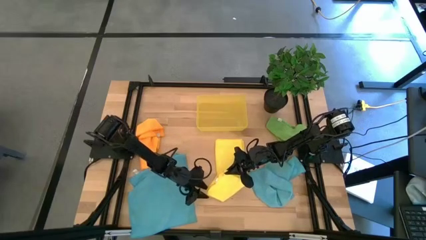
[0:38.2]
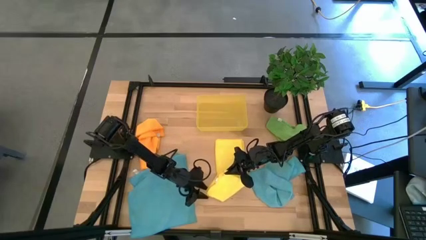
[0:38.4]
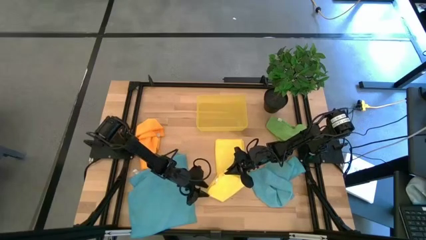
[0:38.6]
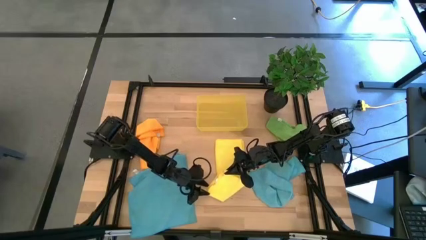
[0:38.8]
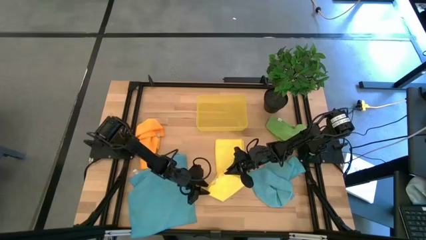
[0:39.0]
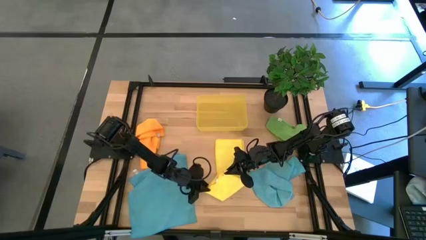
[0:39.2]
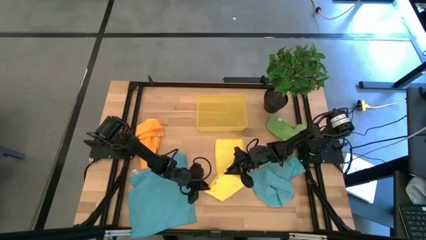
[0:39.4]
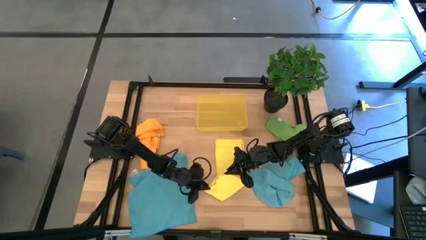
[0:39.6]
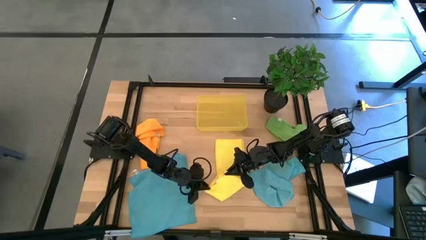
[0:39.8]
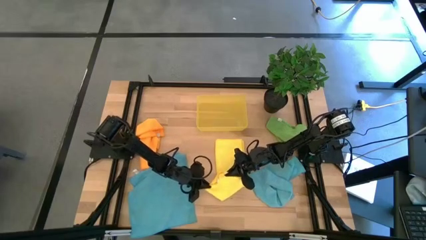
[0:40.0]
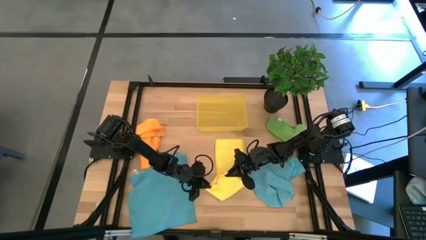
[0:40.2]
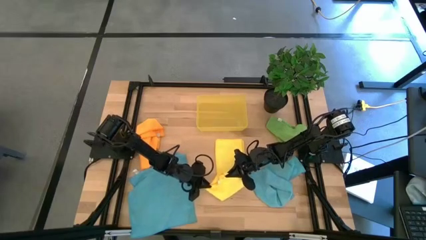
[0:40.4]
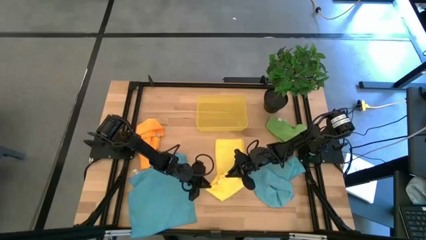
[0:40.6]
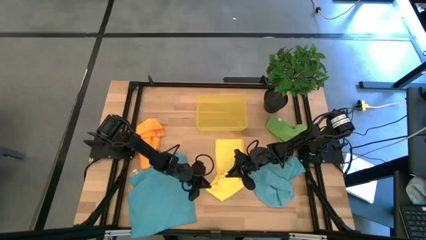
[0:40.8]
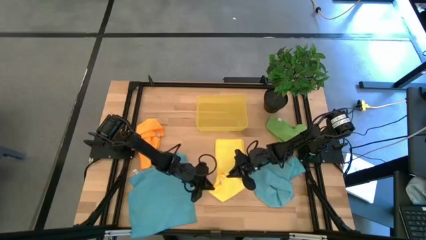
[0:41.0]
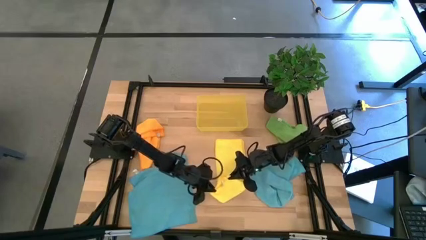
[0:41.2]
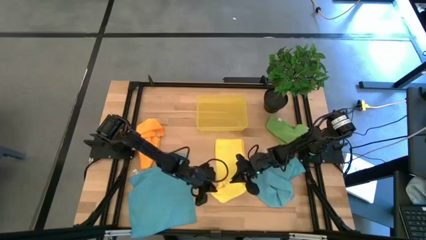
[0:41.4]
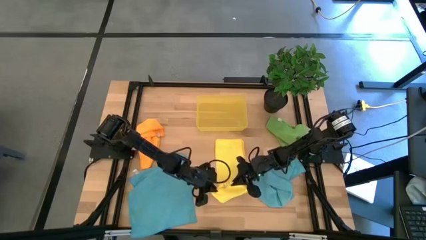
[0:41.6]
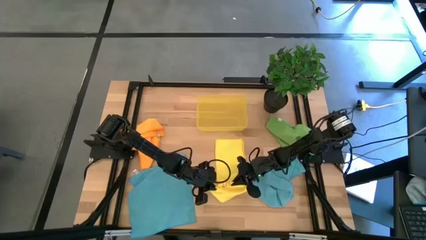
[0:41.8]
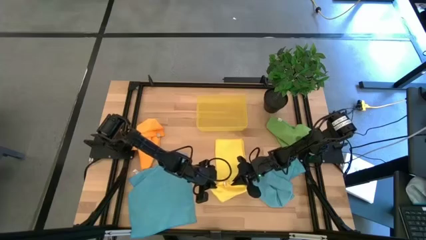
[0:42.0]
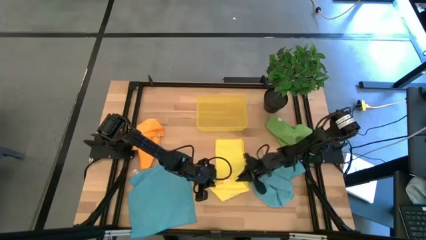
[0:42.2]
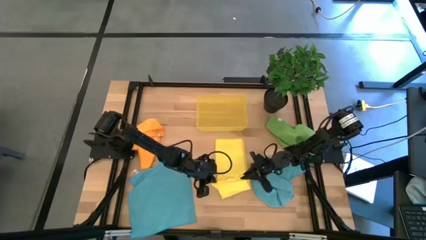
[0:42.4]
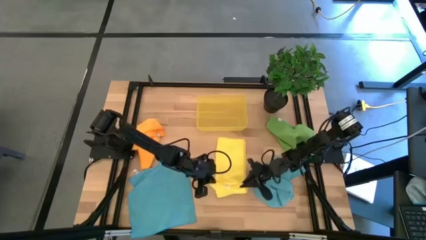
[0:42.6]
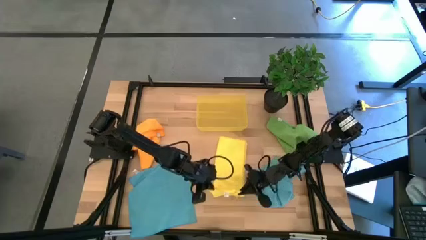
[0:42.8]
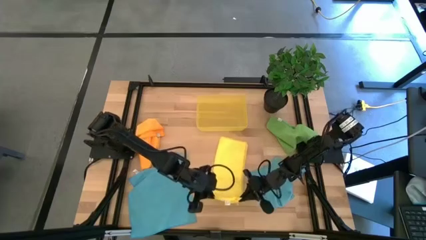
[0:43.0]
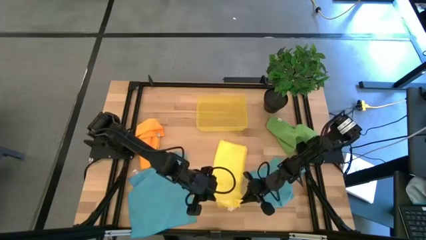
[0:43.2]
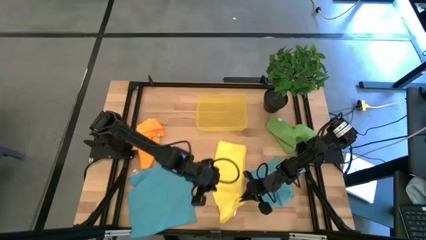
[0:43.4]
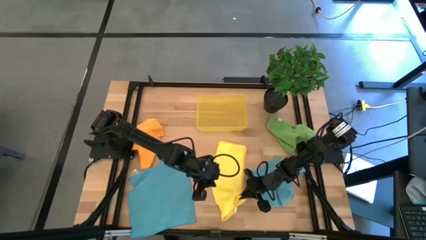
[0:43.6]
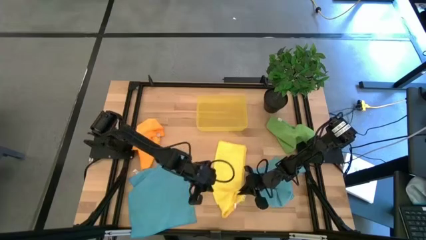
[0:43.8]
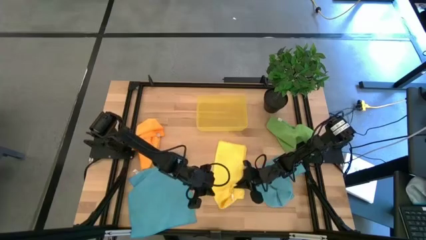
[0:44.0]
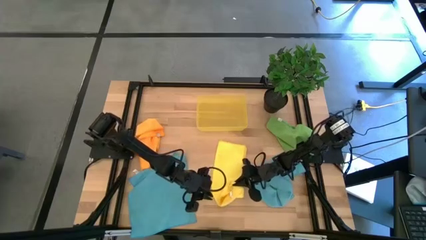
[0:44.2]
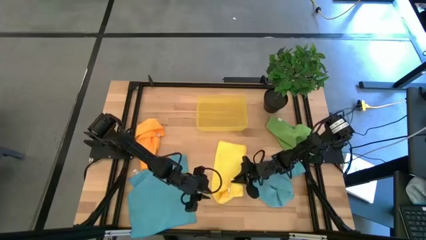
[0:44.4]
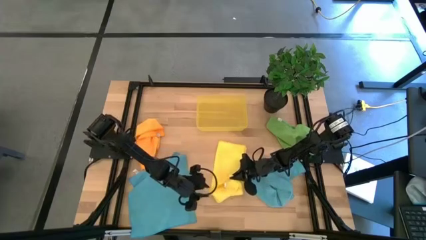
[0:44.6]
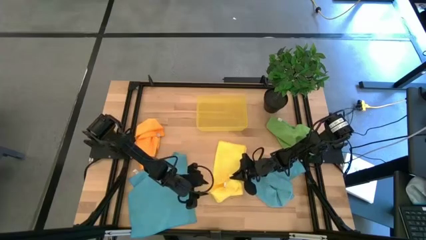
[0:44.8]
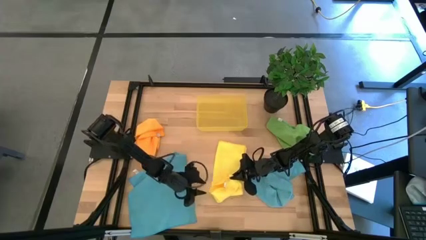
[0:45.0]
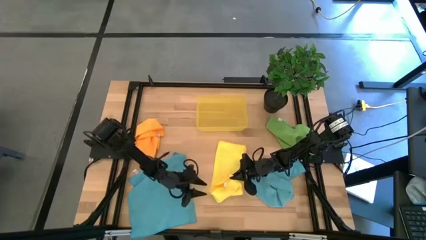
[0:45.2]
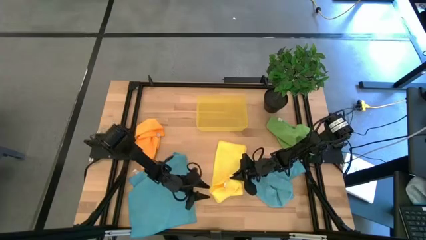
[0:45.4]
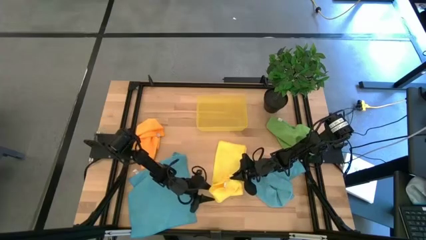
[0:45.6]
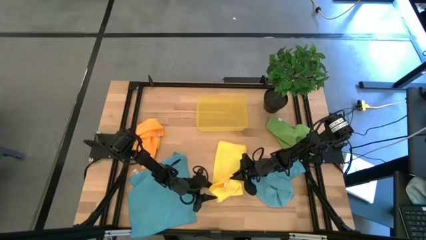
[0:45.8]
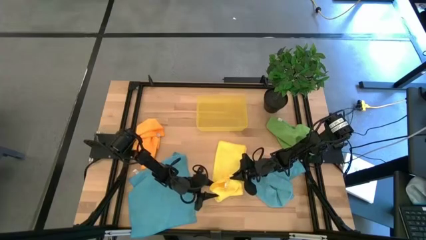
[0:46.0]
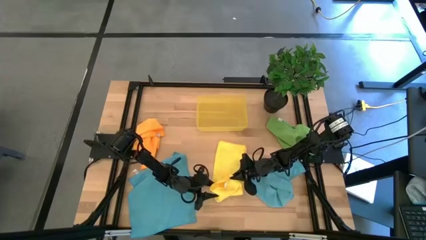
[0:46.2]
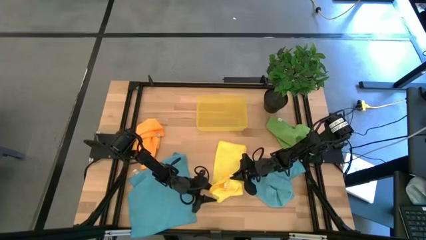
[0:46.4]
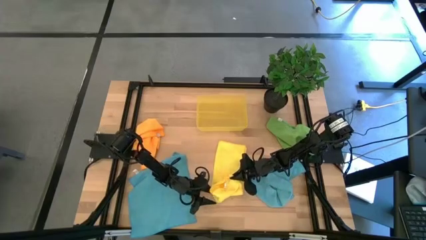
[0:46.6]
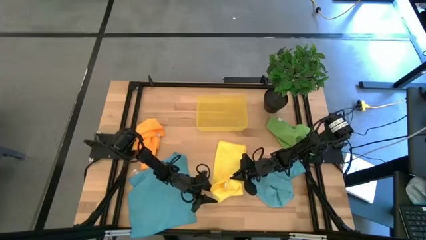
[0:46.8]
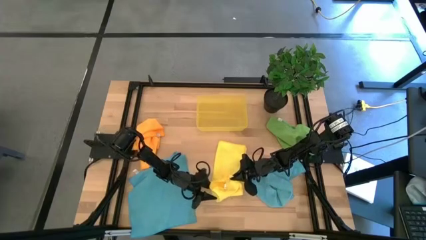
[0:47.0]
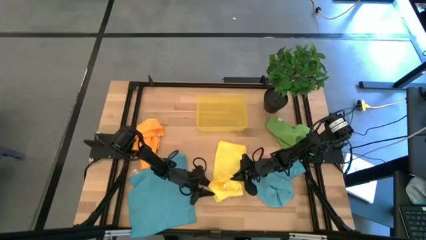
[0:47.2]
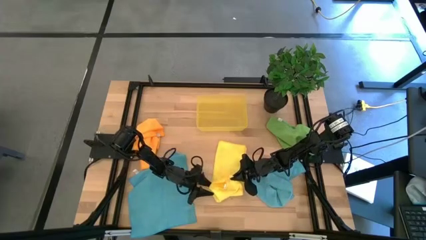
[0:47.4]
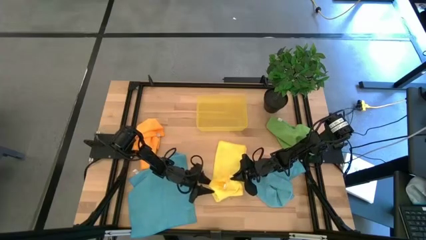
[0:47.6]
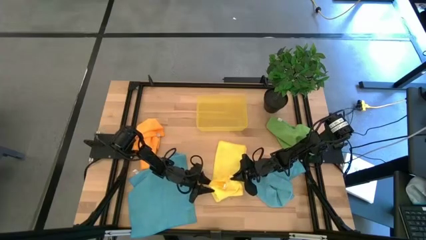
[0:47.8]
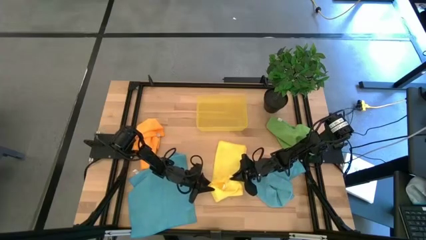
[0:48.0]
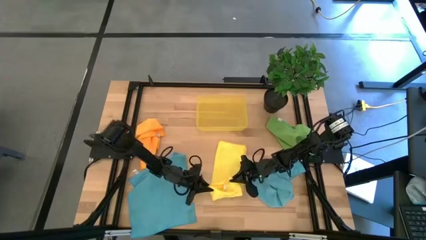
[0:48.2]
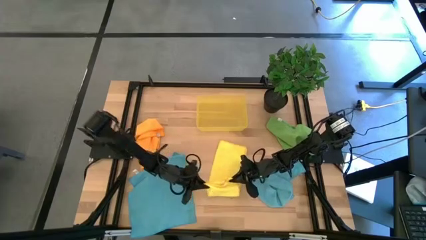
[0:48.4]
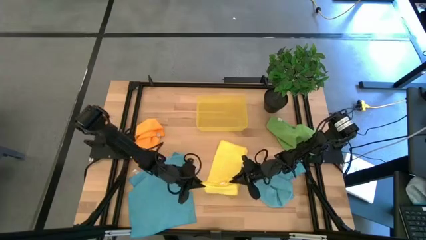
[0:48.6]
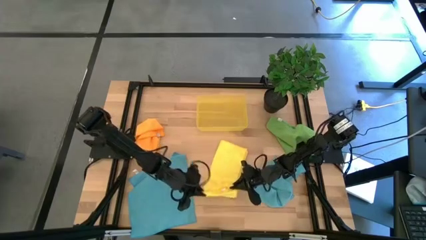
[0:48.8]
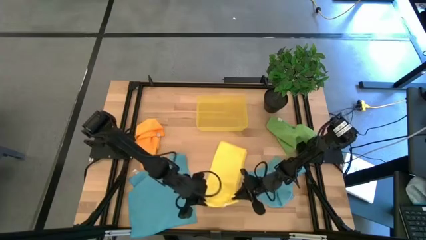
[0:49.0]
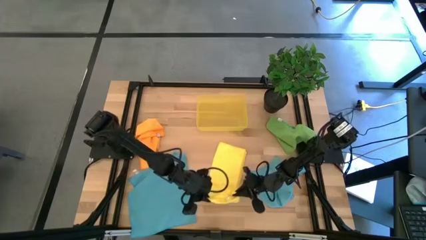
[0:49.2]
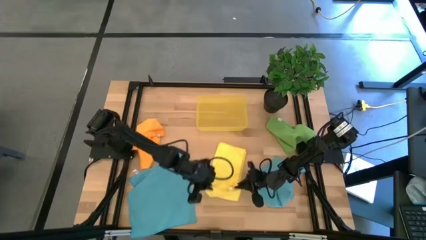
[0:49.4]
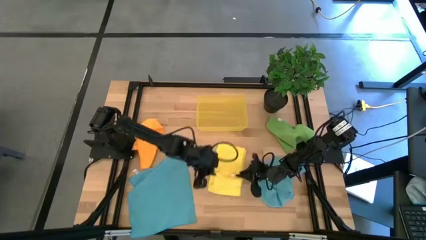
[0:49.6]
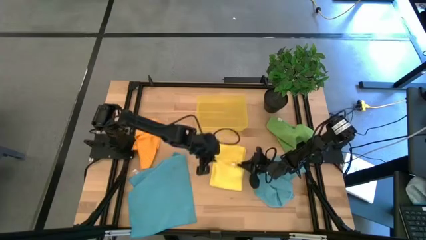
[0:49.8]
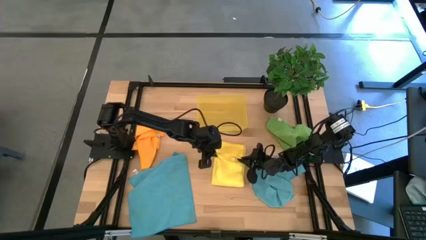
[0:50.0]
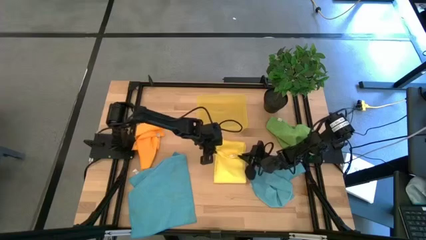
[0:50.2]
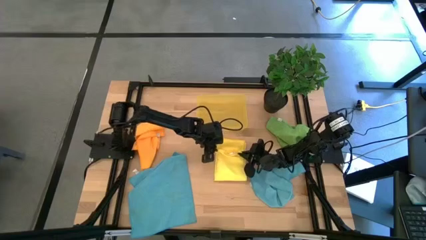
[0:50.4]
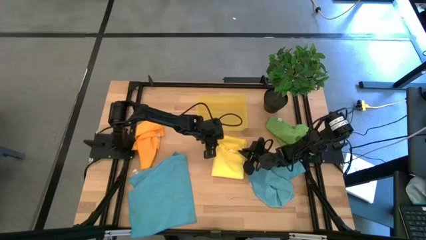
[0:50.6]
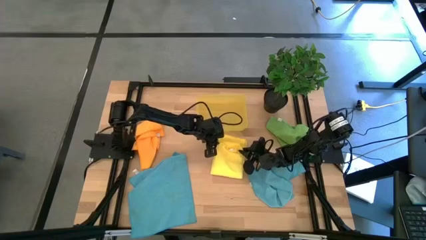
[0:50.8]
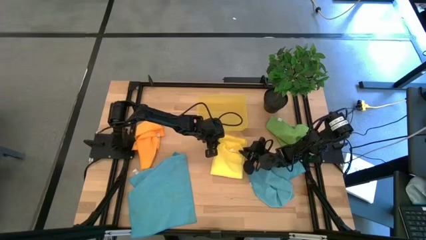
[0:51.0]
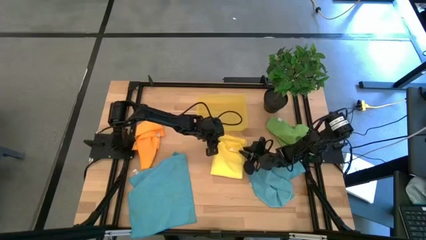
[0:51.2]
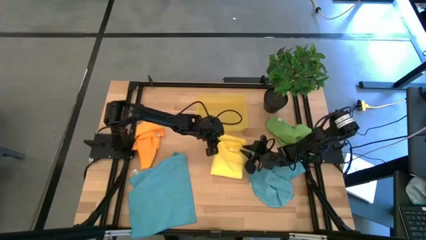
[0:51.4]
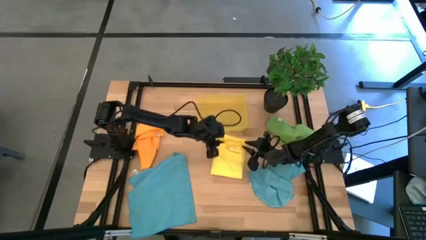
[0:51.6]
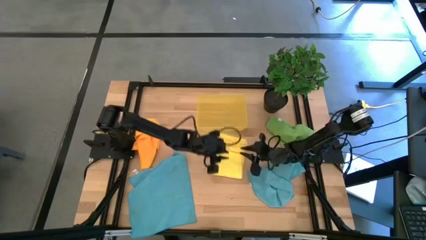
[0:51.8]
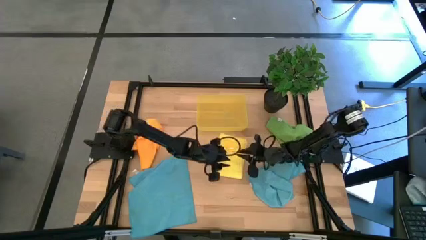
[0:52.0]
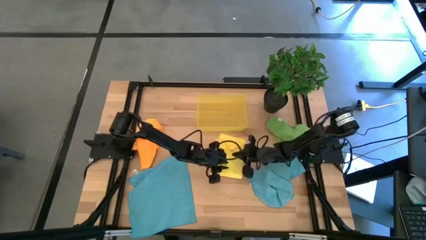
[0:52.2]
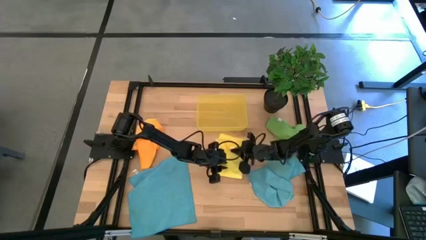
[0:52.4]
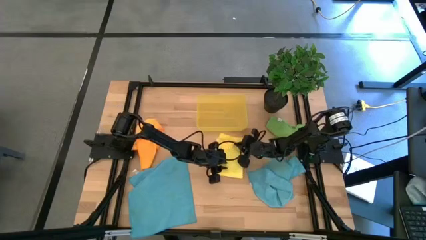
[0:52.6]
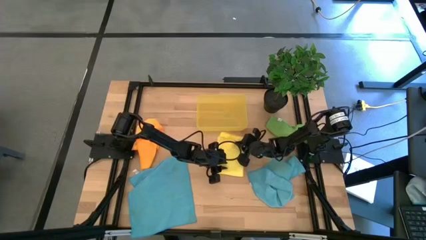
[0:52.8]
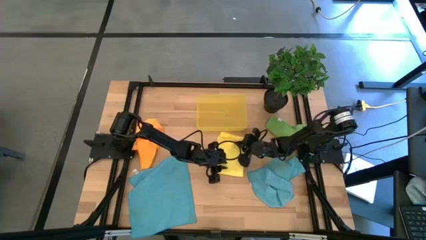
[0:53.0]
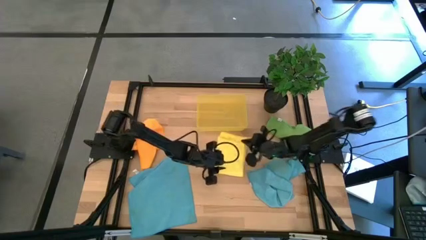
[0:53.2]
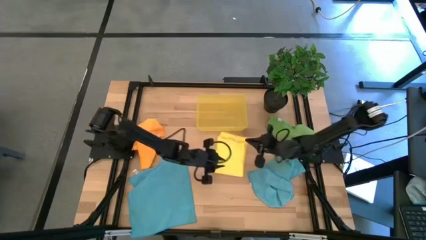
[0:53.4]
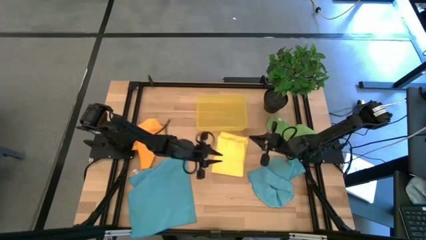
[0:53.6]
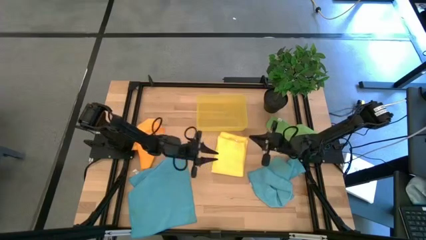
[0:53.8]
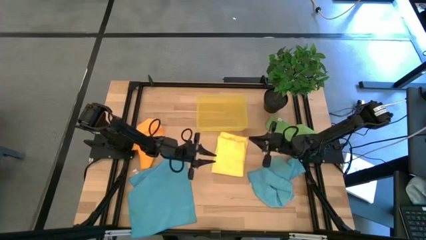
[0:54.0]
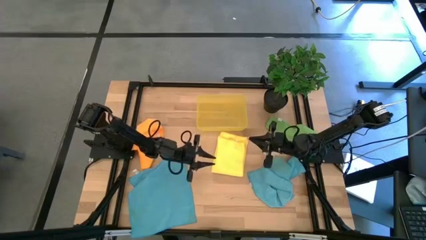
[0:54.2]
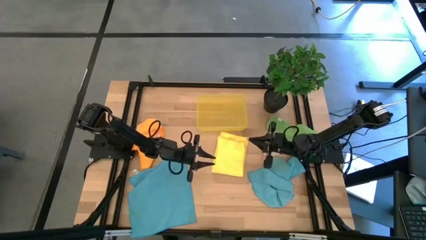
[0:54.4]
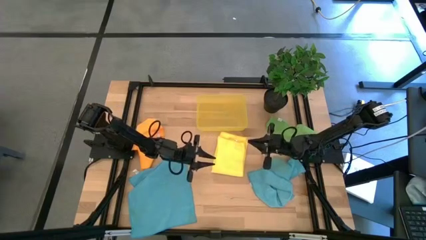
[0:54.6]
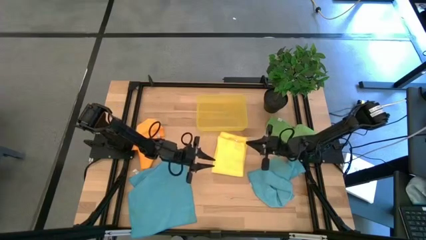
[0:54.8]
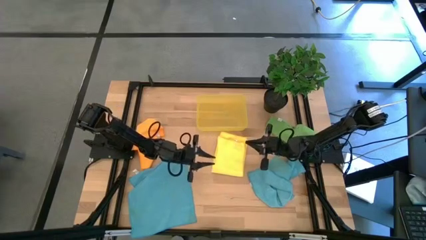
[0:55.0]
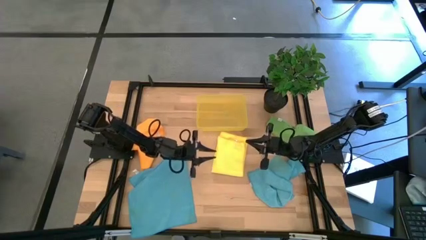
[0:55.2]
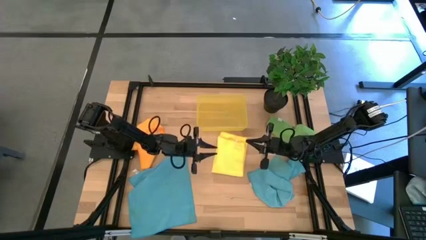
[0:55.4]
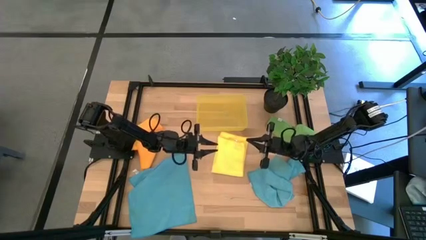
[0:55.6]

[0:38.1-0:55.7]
Task: Fold microfiber towels
Fold the yellow microfiber towel
